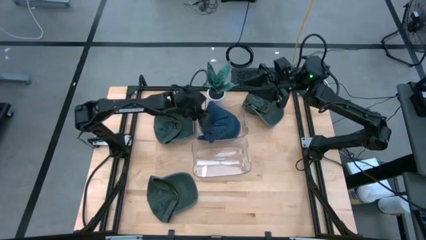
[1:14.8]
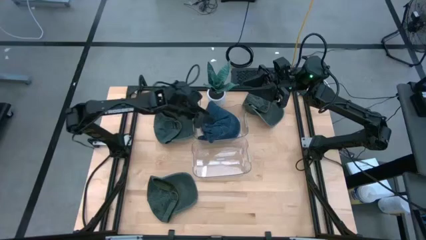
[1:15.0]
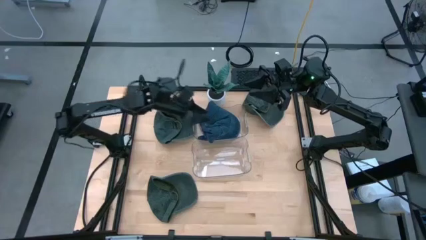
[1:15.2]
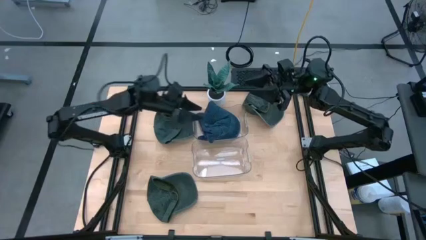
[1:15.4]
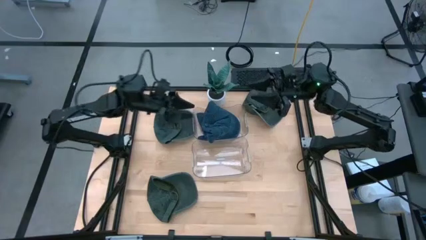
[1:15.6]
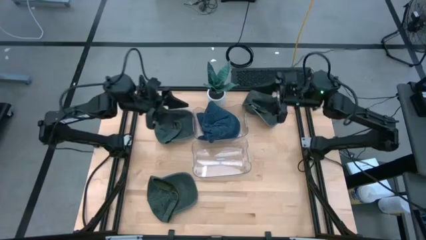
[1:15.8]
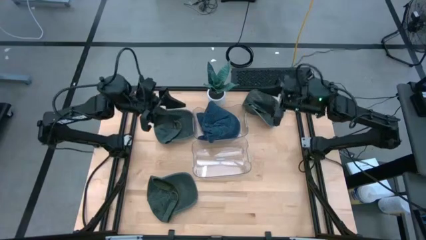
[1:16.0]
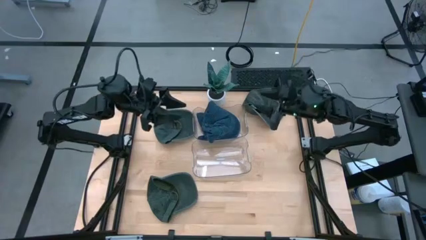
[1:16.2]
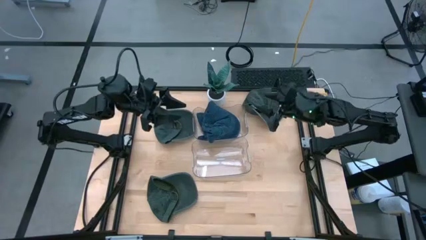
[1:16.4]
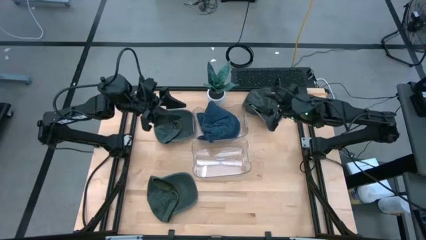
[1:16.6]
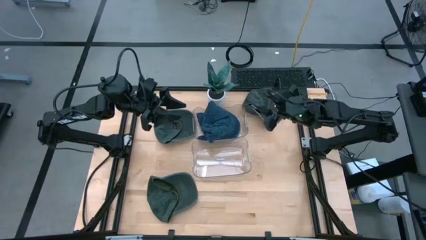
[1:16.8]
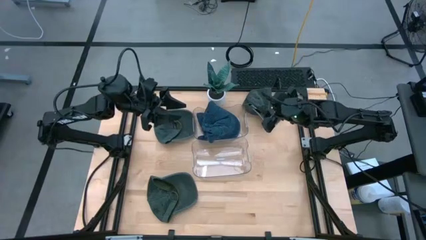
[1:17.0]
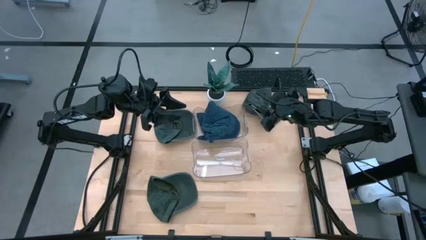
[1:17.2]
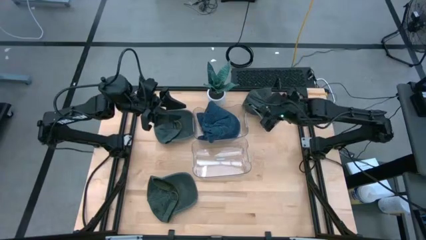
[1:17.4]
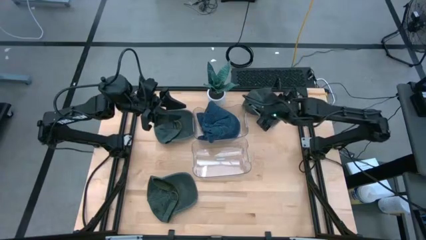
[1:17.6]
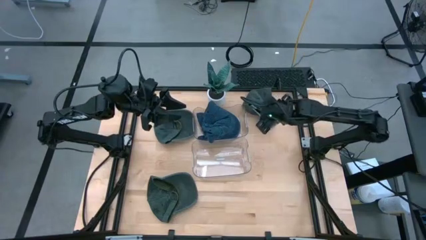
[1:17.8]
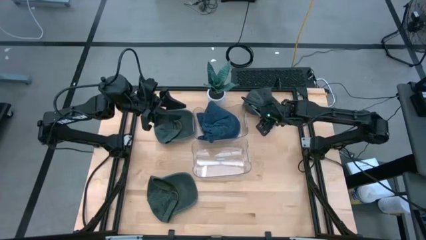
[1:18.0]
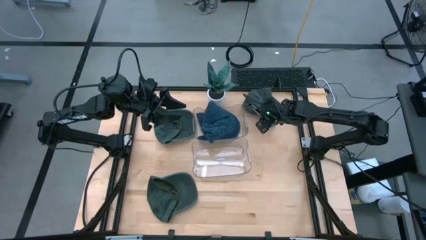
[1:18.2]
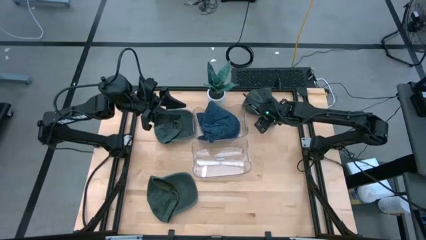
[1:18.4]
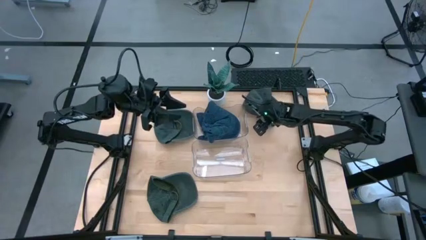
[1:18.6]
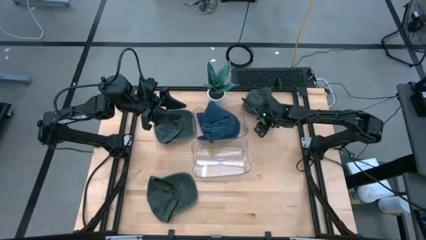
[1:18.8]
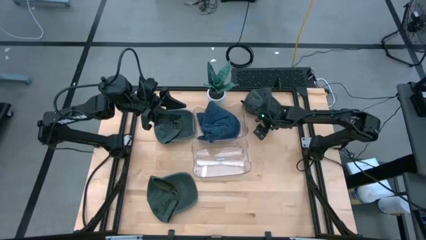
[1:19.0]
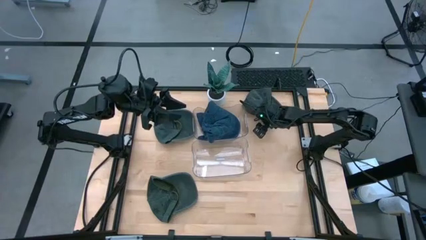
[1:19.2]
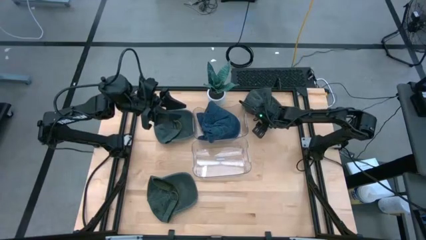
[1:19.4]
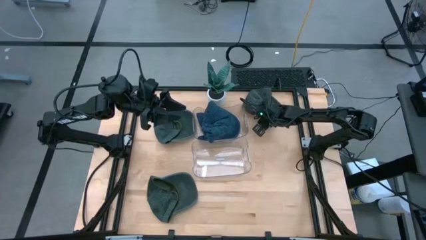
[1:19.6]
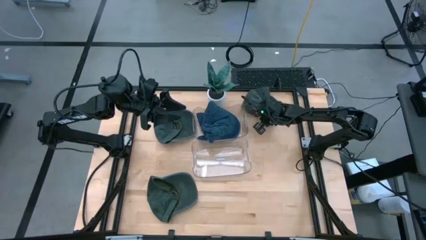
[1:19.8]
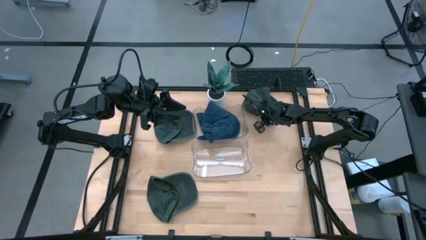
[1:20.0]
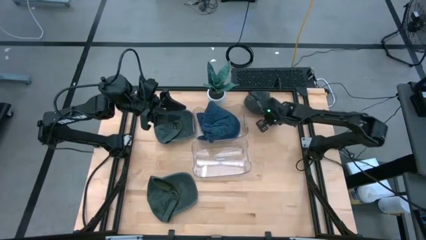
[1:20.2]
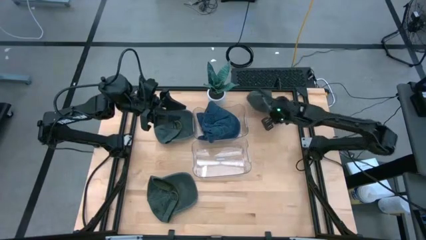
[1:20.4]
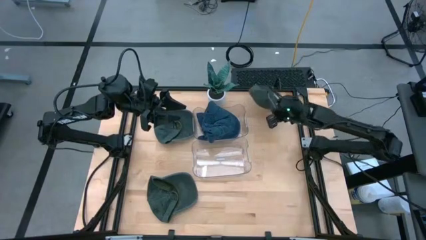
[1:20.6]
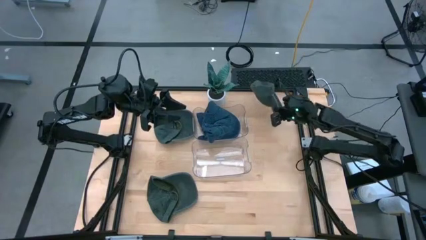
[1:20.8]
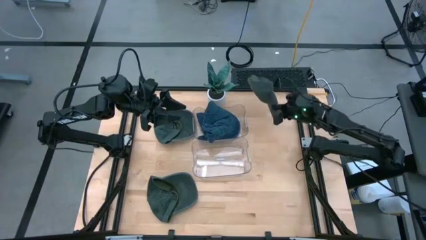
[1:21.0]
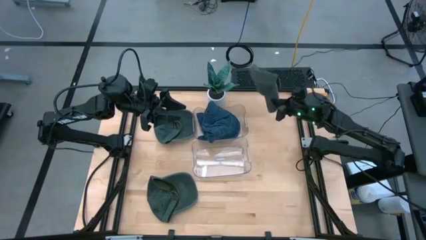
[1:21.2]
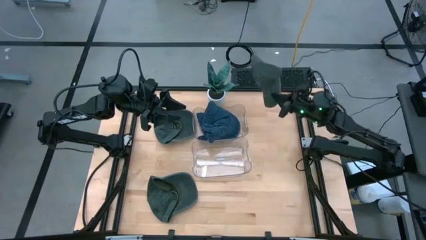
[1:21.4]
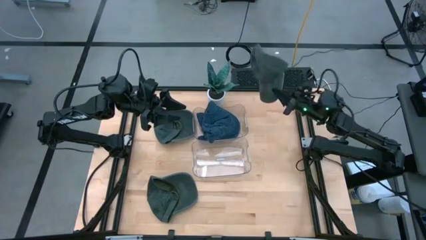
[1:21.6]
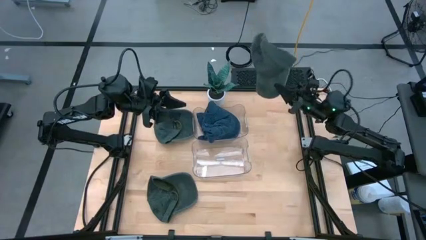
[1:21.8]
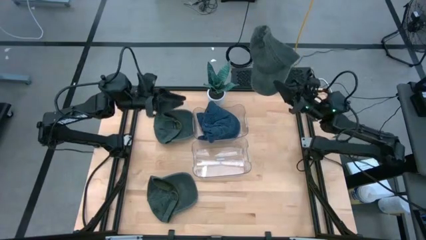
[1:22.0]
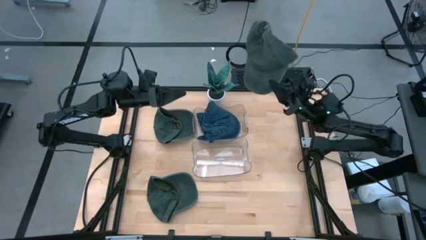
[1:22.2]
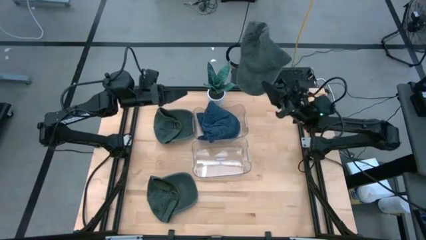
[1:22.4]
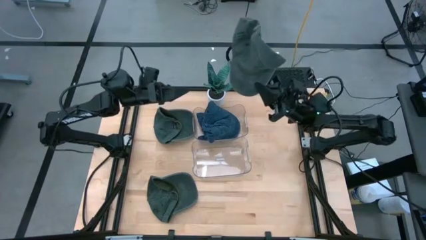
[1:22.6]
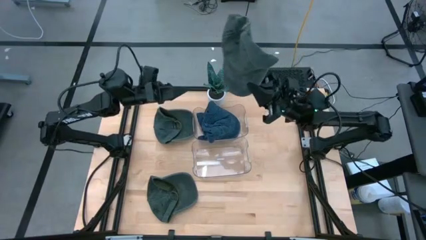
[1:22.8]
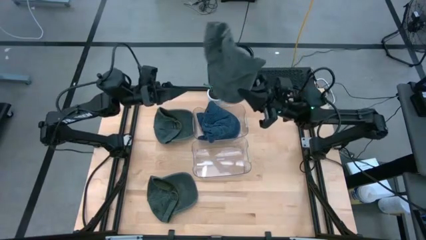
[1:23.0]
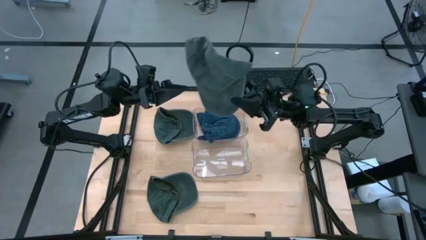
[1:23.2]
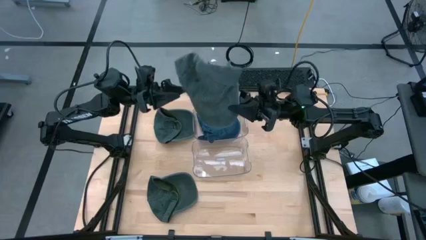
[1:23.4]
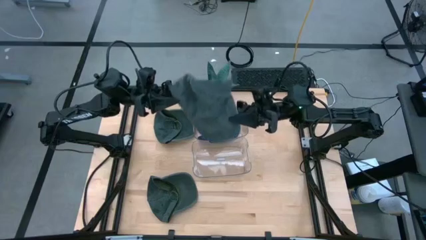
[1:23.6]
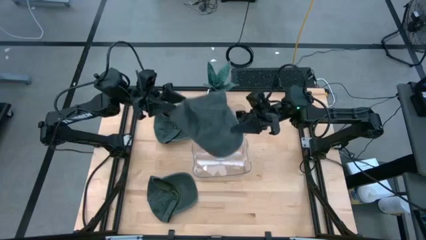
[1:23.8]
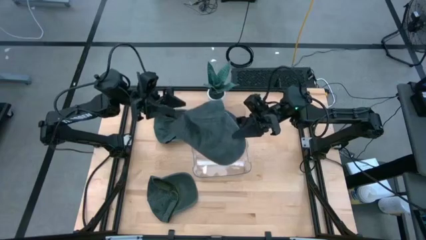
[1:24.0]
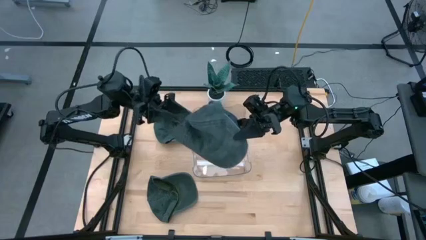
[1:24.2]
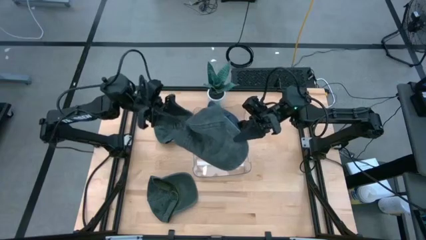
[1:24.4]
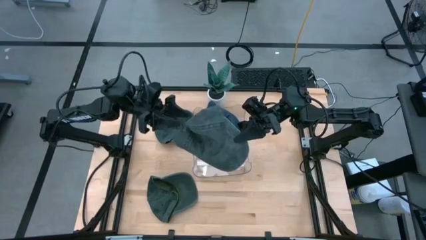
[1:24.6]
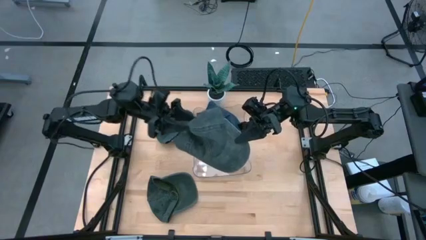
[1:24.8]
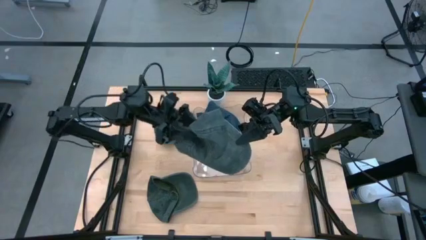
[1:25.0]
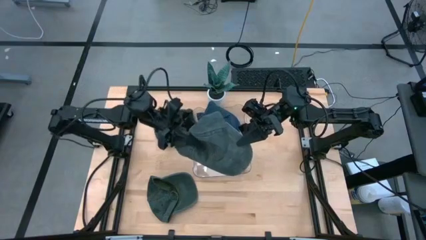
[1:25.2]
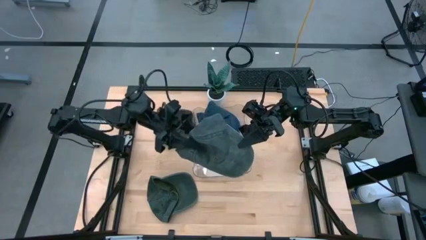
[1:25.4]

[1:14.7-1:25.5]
Task: Pick & Place hat
Put the top right black cap into the bottom transparent bin

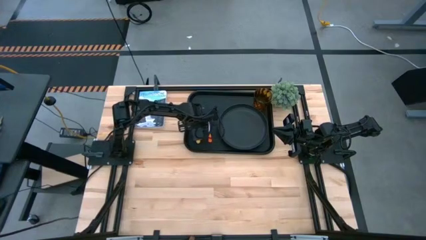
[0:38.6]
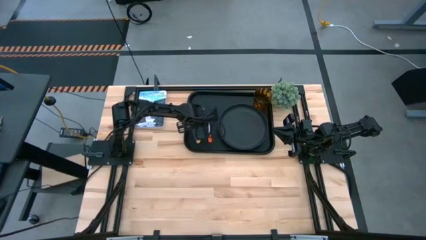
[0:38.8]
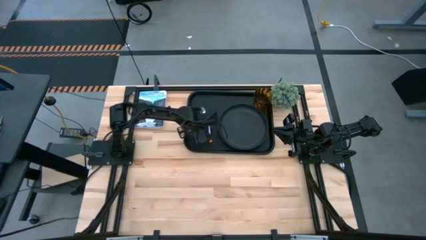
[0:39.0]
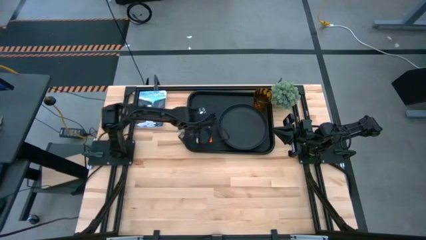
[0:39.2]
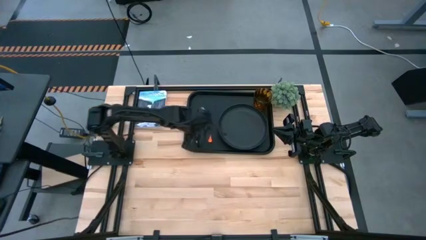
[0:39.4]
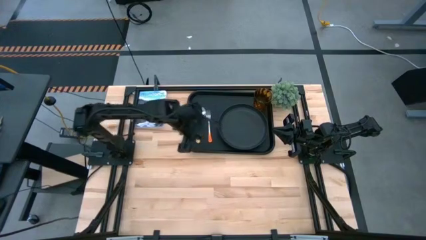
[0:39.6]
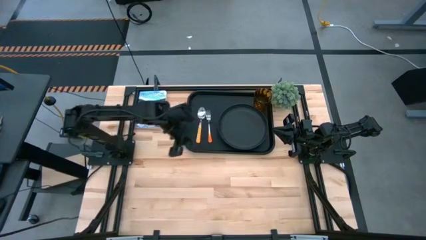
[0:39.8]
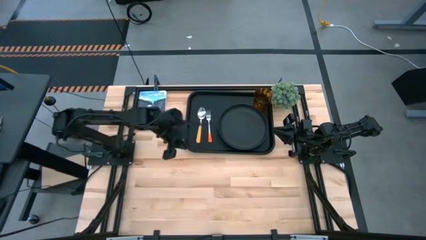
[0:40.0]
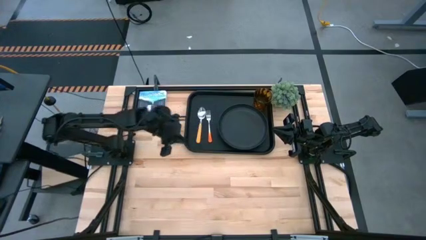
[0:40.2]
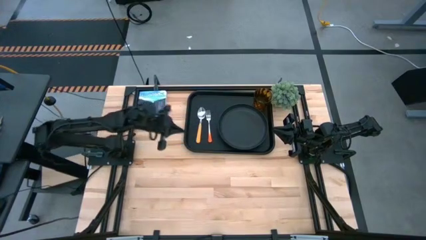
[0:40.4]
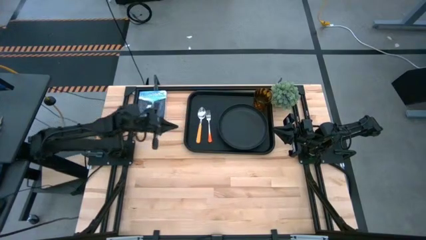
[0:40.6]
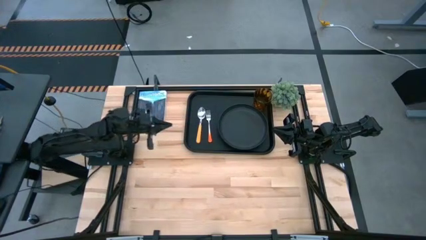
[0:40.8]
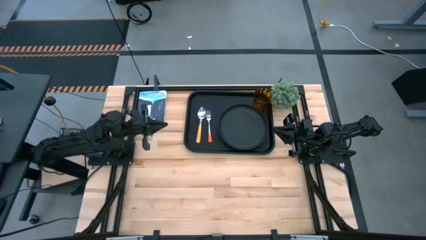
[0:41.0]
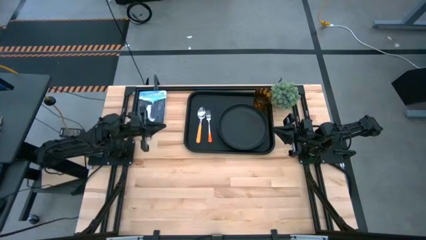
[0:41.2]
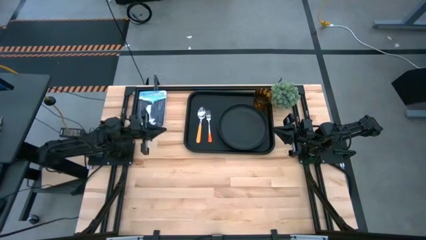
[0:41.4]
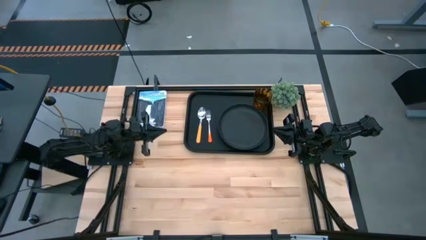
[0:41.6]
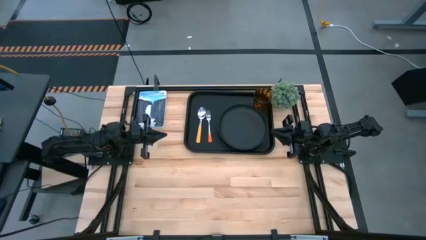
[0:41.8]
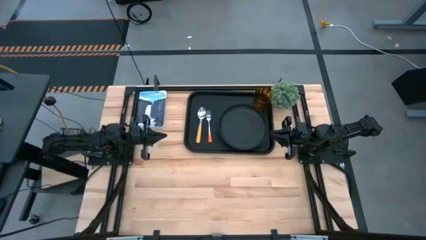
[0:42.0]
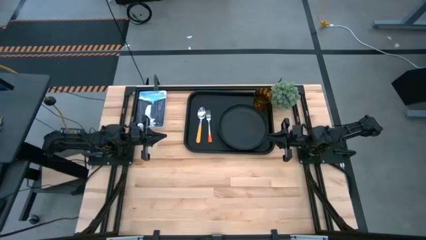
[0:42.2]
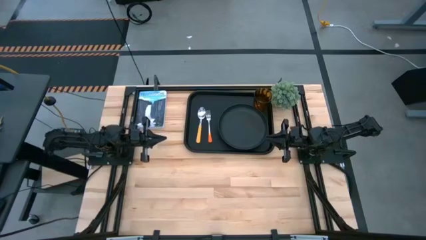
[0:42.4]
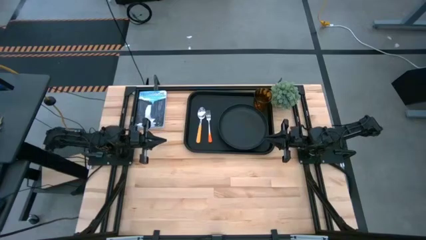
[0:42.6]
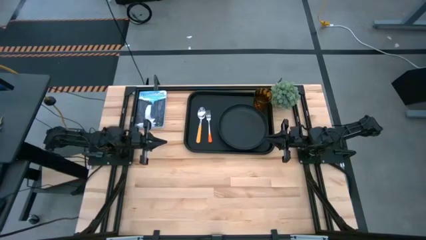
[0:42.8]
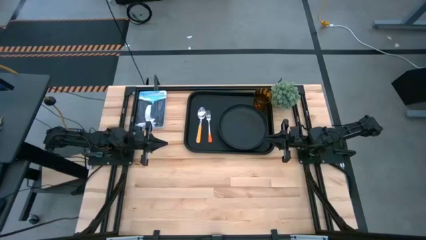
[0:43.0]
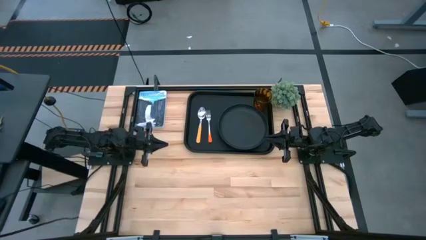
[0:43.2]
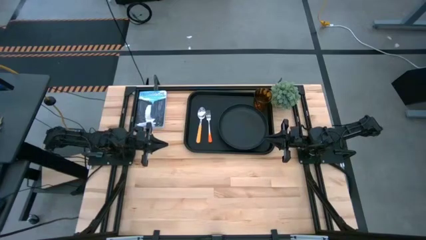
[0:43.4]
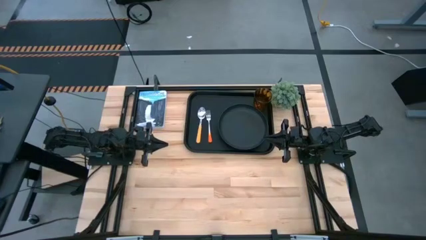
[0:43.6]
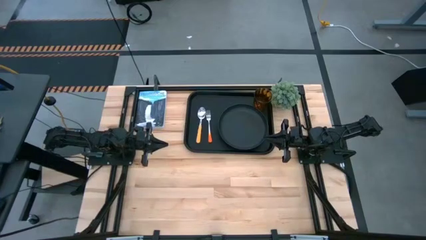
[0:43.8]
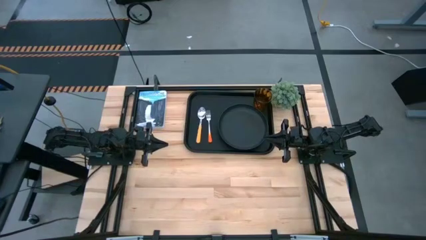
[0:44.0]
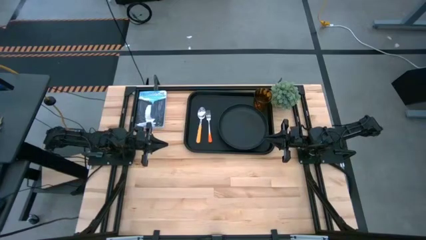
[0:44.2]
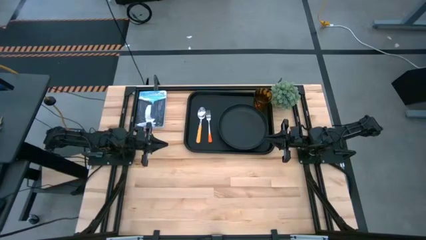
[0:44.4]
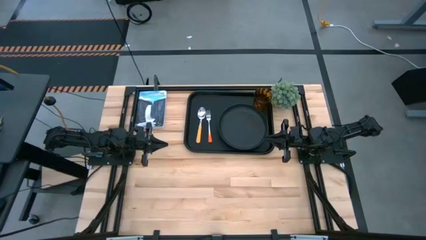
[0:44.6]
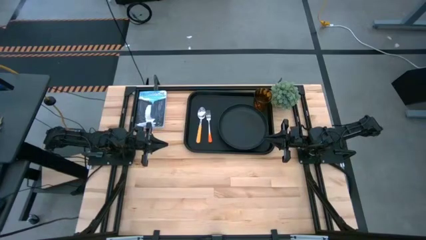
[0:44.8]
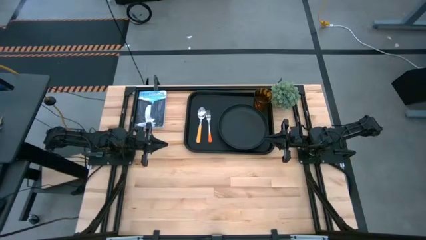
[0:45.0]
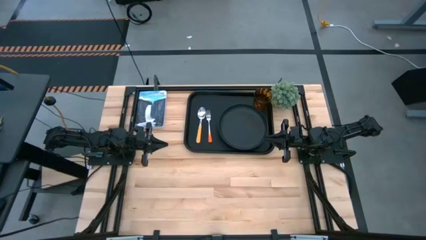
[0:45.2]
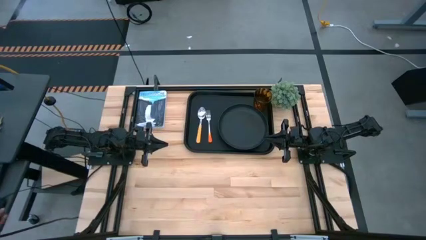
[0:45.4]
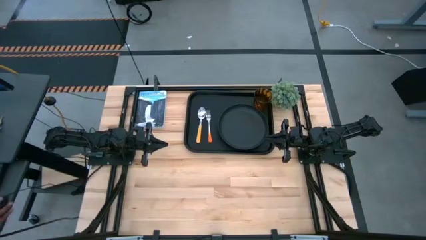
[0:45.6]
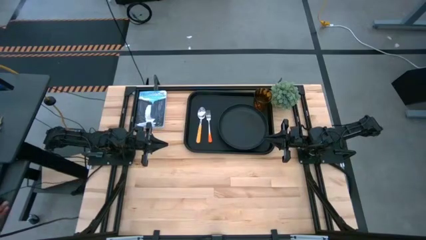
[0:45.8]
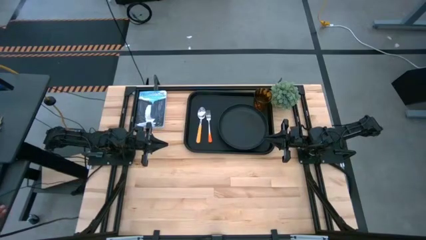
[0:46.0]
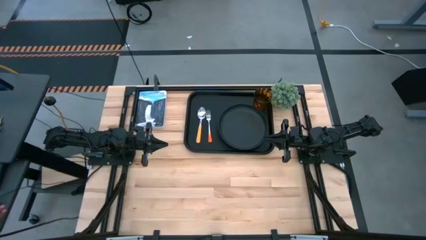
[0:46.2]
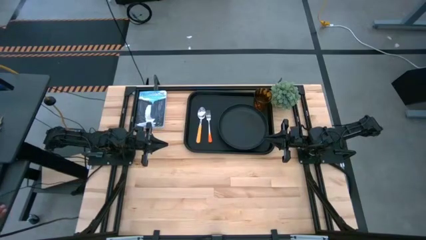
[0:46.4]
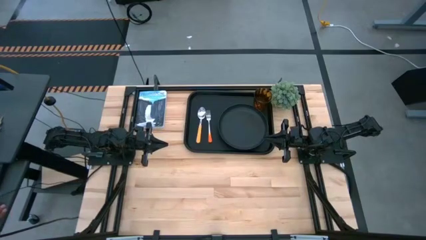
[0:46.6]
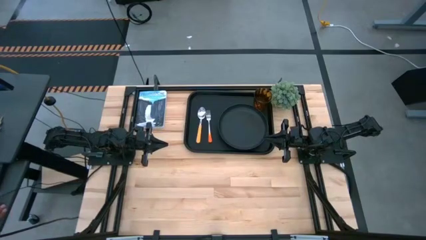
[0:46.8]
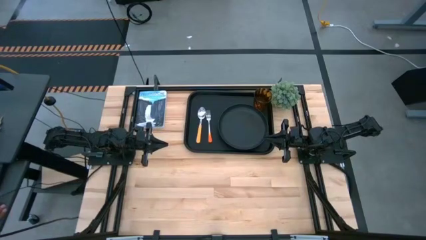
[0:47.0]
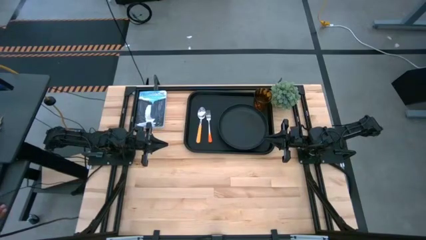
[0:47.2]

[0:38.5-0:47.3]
Task: Pick and place plate/cup/fork/spoon on tray
Return to Home Position
